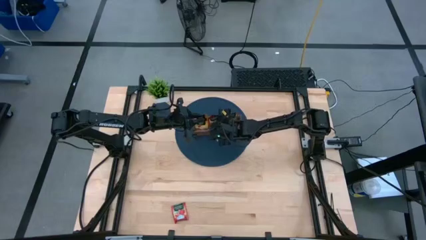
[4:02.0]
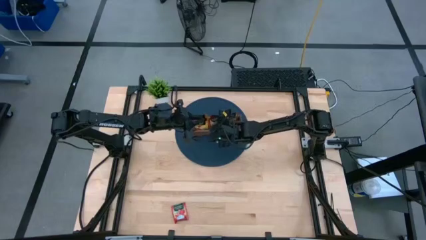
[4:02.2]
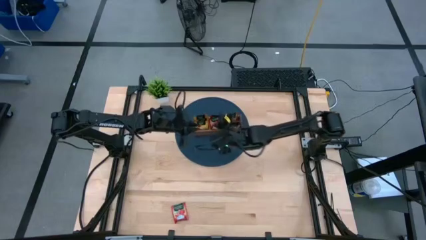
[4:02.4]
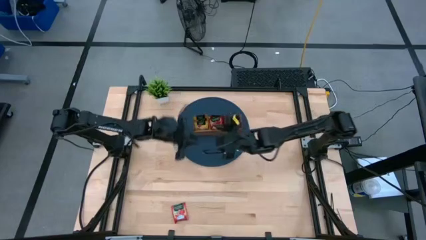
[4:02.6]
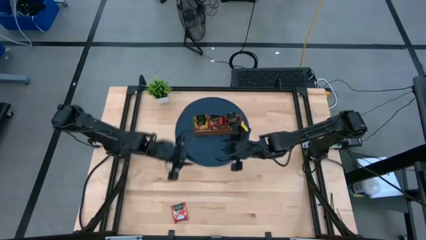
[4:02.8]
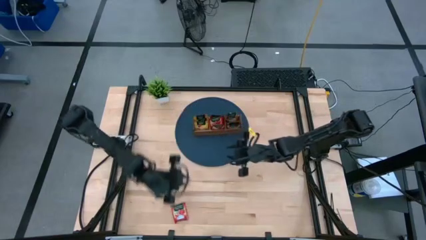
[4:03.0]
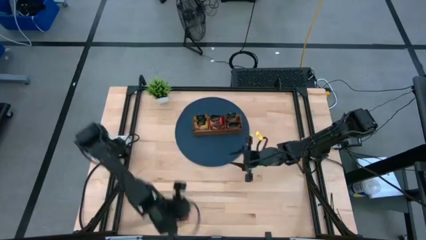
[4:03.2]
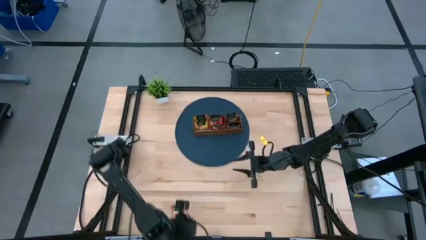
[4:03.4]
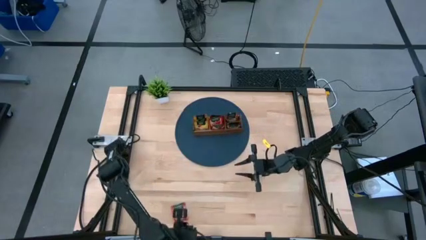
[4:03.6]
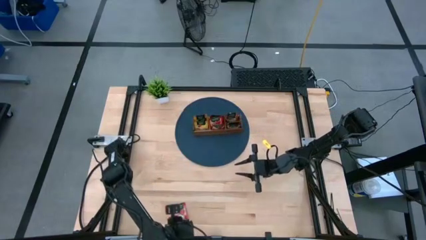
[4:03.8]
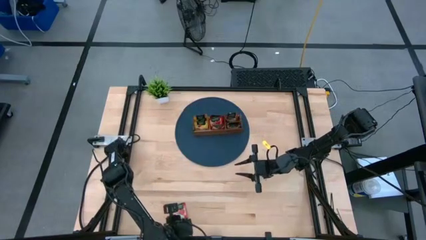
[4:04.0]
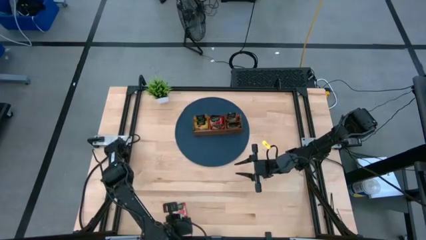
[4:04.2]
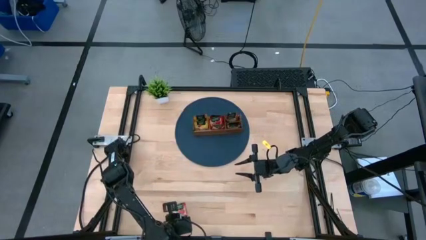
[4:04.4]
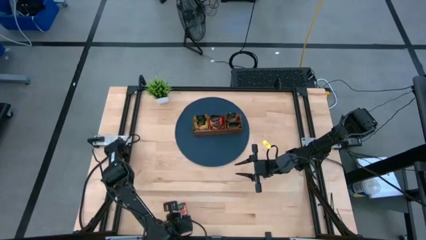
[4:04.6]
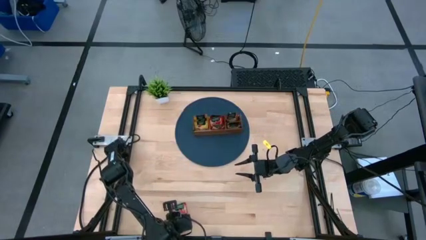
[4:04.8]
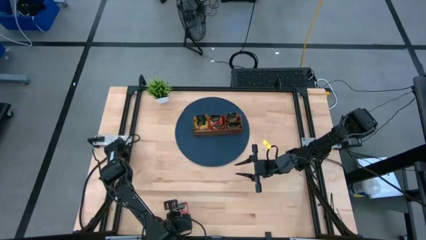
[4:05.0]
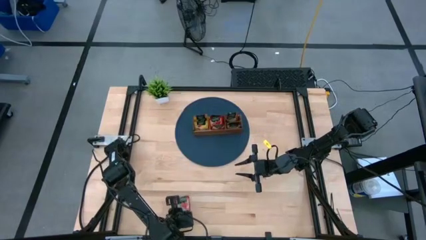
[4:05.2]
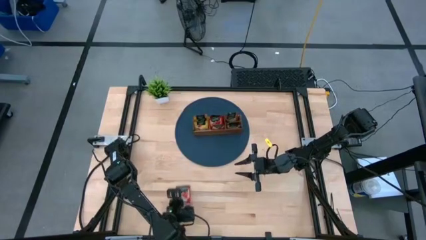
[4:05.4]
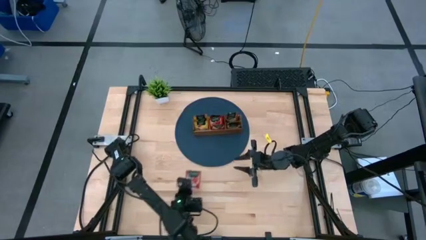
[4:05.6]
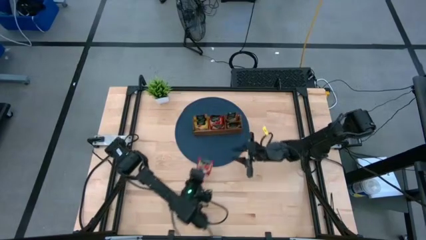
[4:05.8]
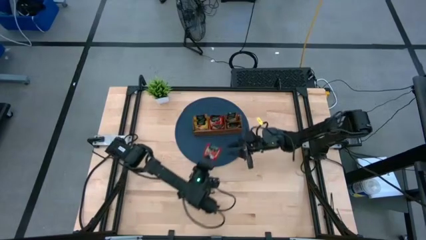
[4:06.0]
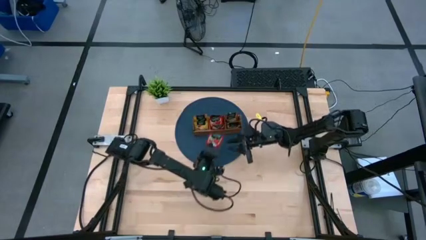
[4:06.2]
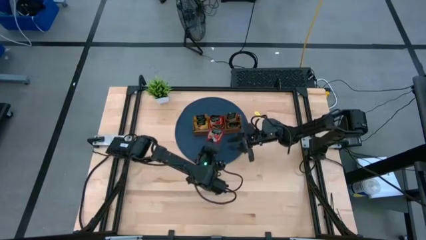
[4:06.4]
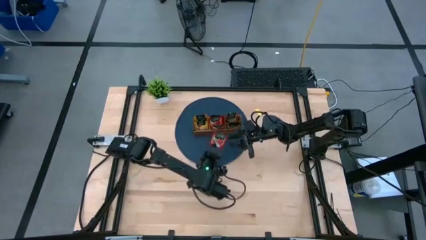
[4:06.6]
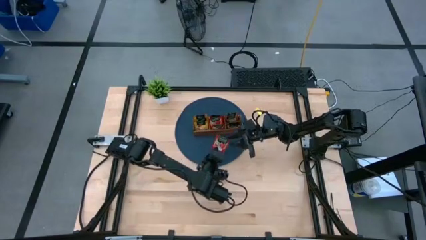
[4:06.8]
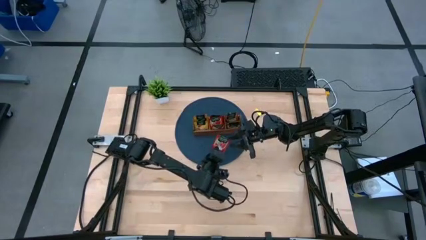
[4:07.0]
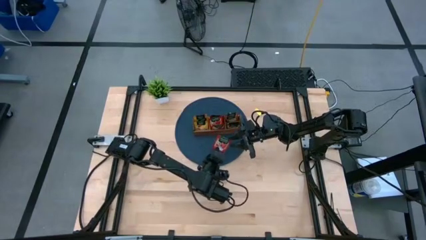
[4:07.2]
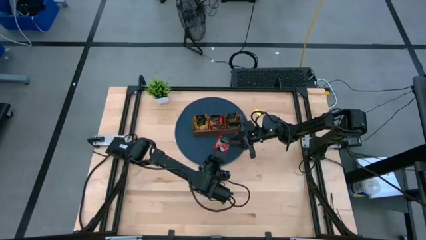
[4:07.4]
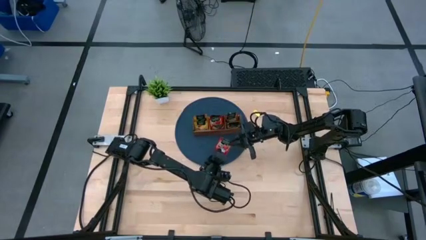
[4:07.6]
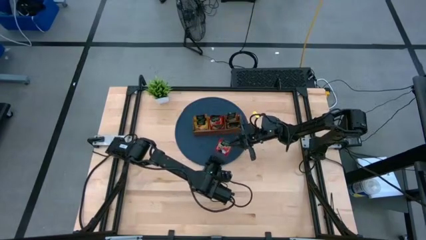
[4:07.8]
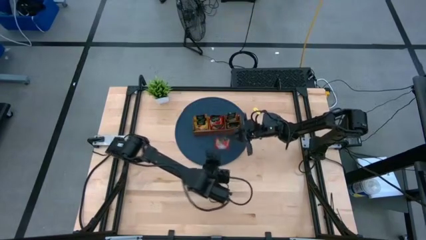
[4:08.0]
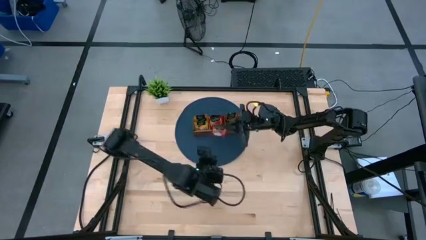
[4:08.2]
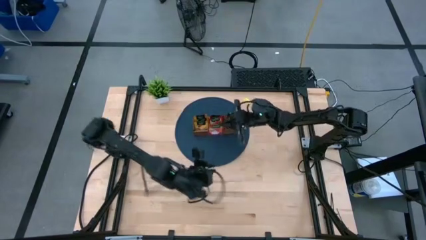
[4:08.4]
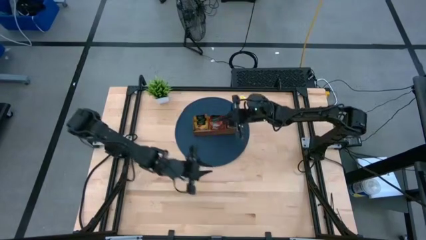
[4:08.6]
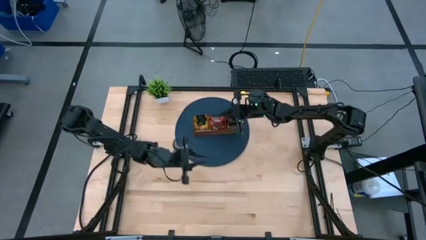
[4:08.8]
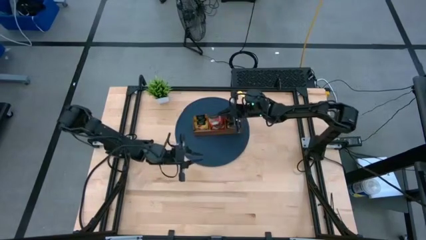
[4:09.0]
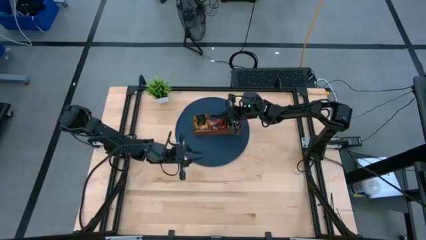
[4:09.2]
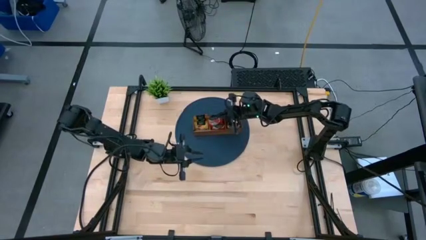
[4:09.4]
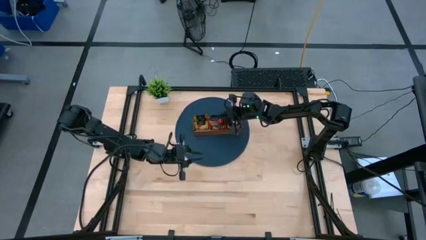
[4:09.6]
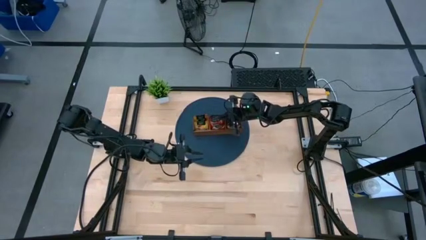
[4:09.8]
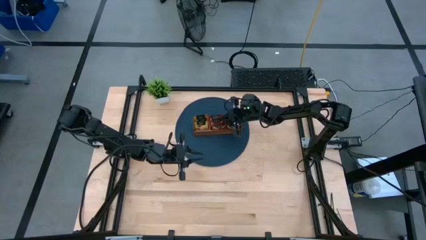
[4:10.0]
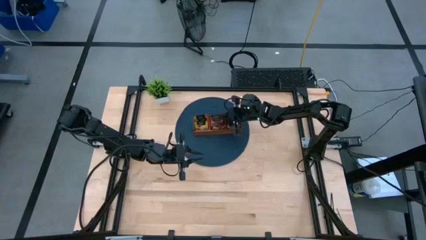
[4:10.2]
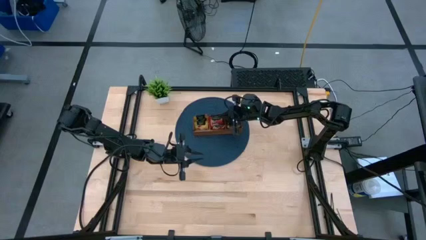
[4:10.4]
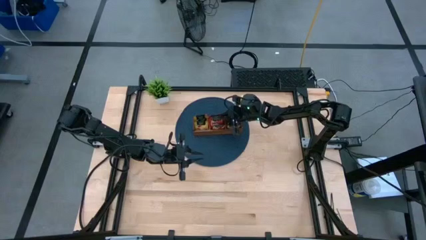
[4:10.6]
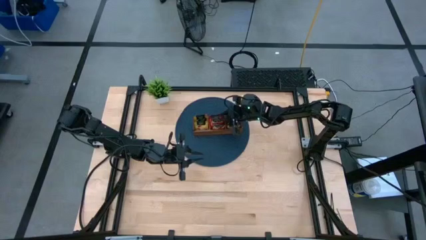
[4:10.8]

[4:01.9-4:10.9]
Task: Pick & Place Tea
Put the red tea bag into the middle section of the wooden organizer

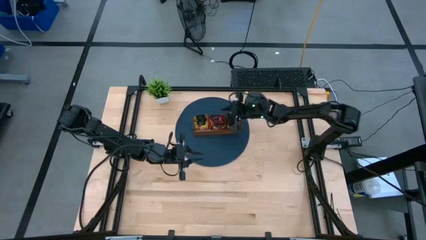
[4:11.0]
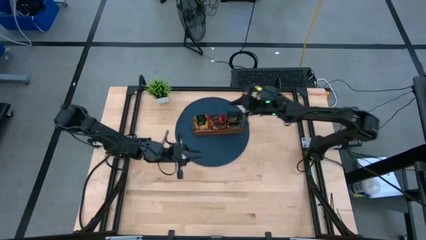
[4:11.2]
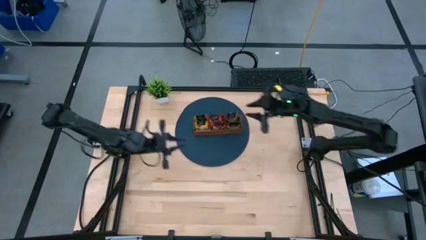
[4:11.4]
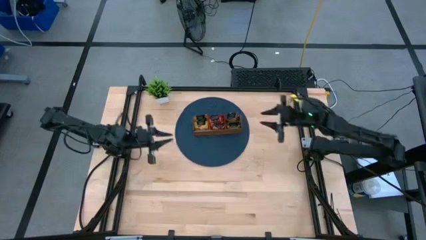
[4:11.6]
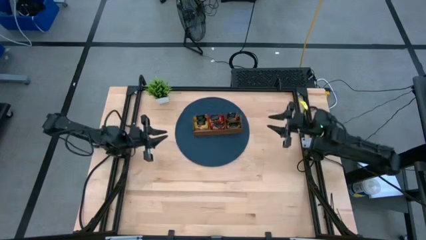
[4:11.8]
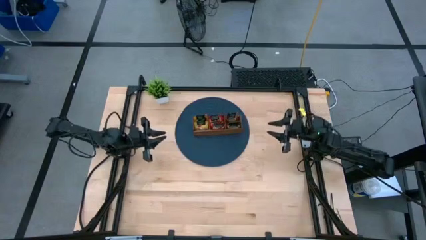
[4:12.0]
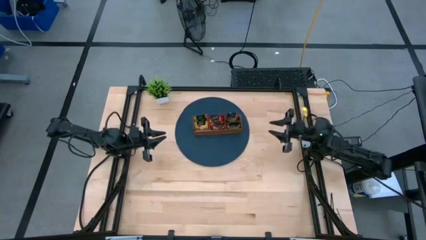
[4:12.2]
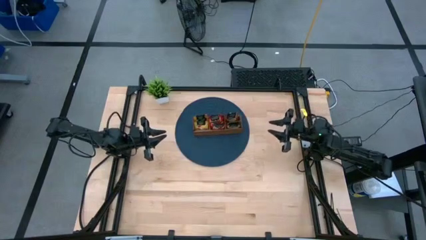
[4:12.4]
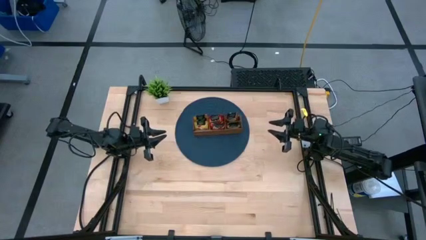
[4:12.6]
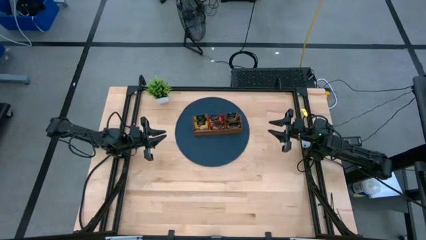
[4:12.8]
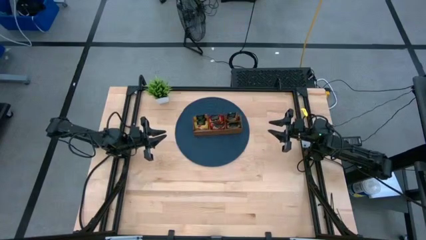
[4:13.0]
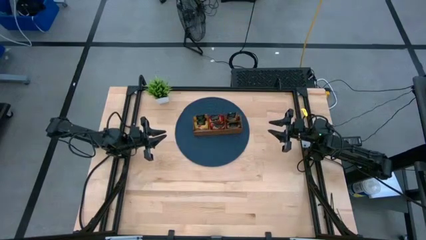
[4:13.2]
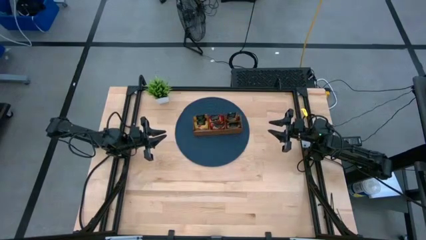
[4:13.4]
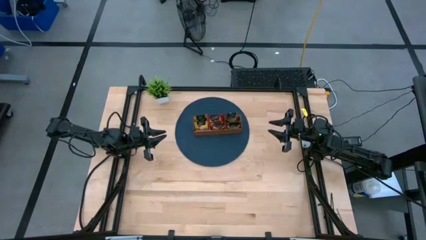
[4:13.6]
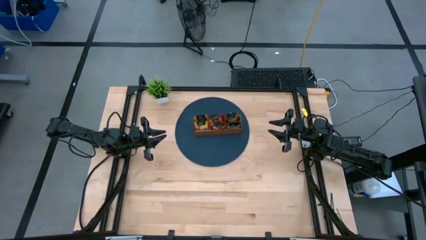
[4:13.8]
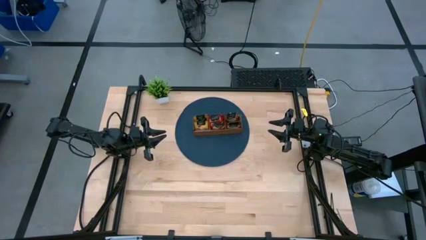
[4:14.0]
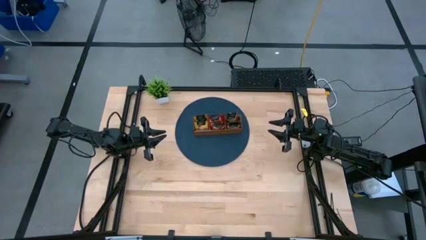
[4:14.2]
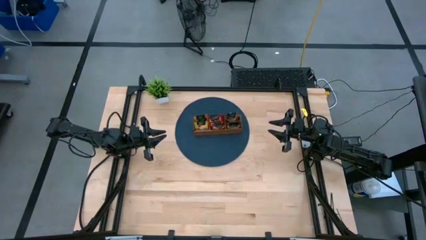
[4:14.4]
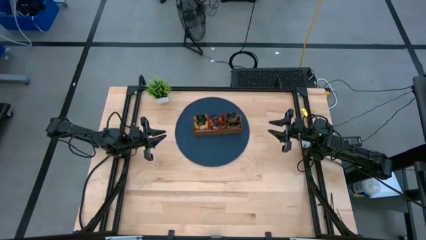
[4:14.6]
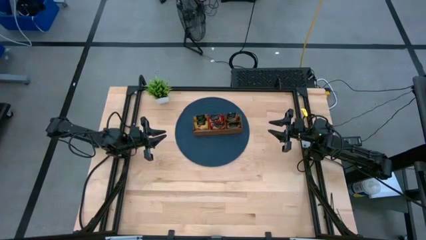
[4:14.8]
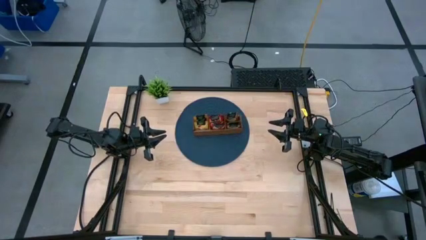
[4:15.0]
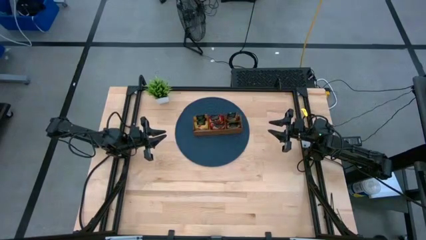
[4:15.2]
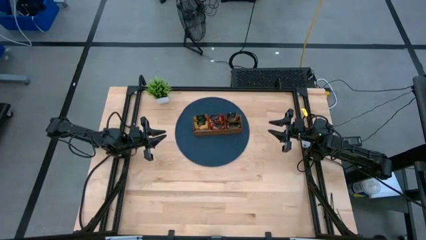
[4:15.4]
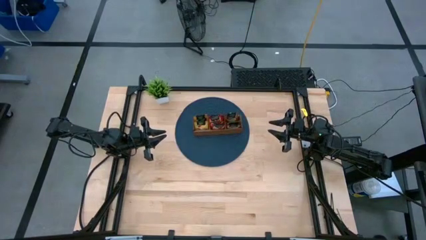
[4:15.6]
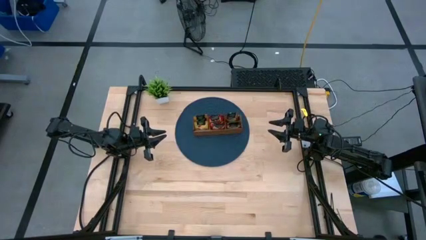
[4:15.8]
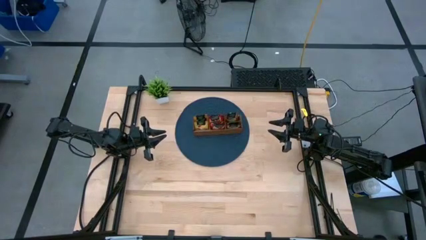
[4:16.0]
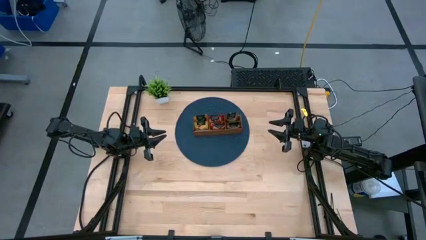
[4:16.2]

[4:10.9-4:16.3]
Return to Home Position
